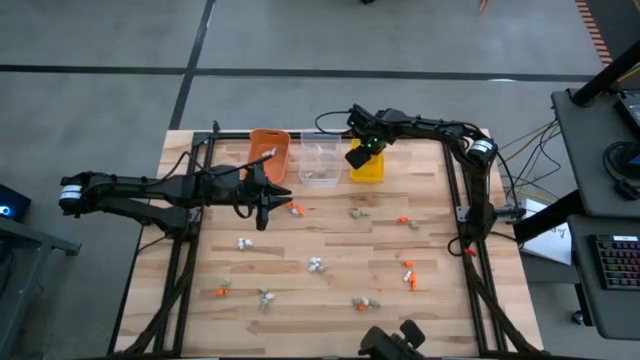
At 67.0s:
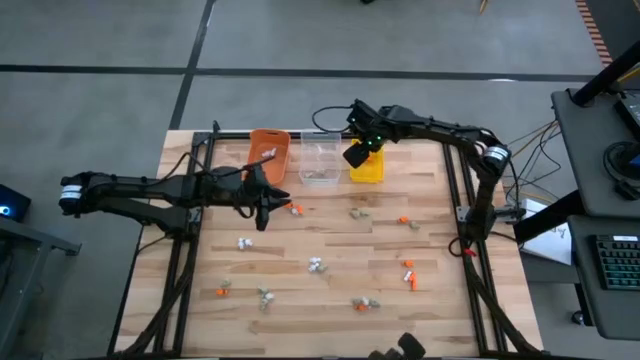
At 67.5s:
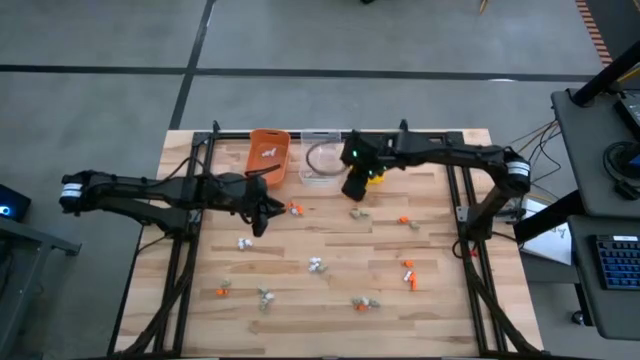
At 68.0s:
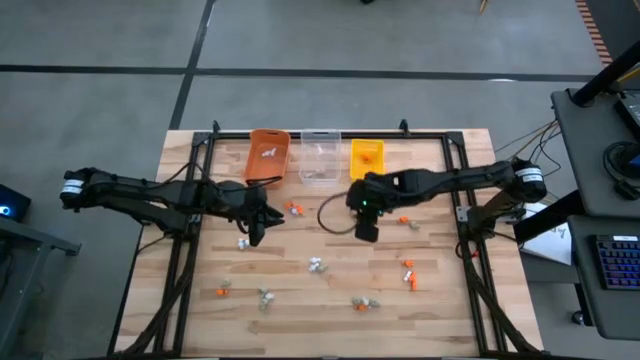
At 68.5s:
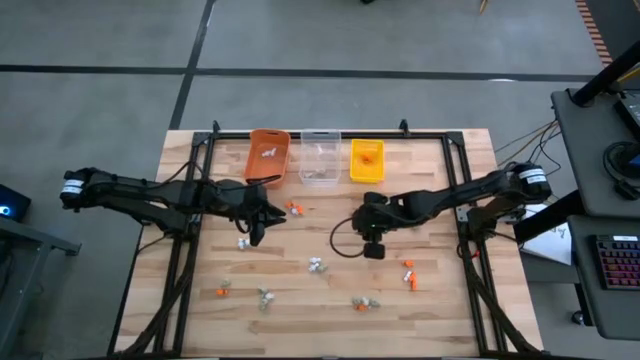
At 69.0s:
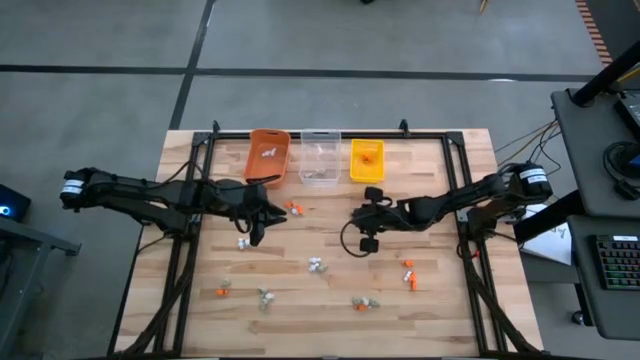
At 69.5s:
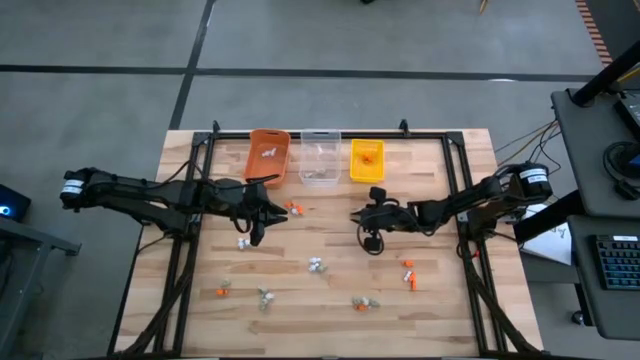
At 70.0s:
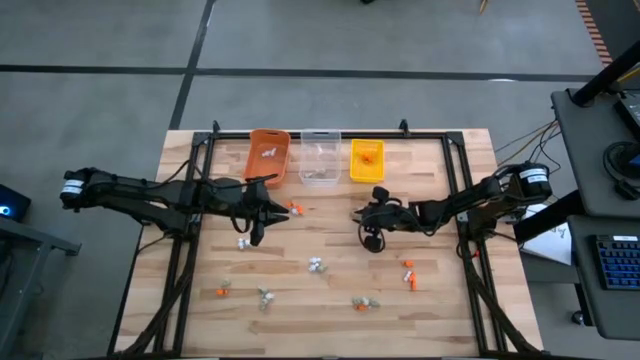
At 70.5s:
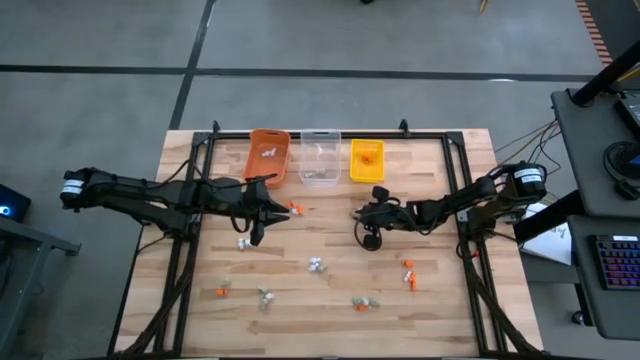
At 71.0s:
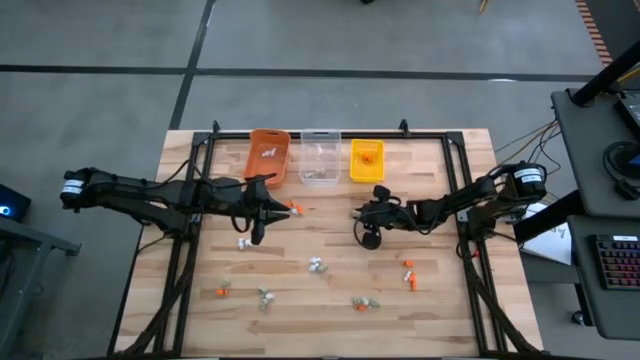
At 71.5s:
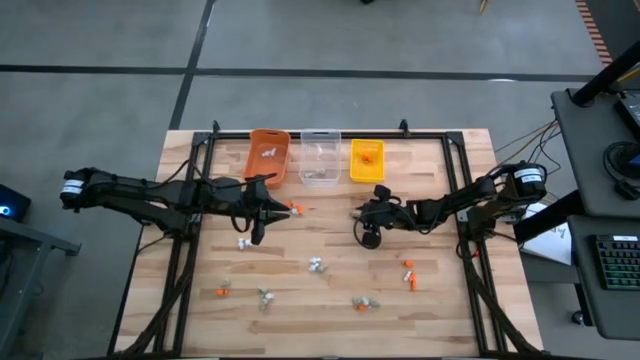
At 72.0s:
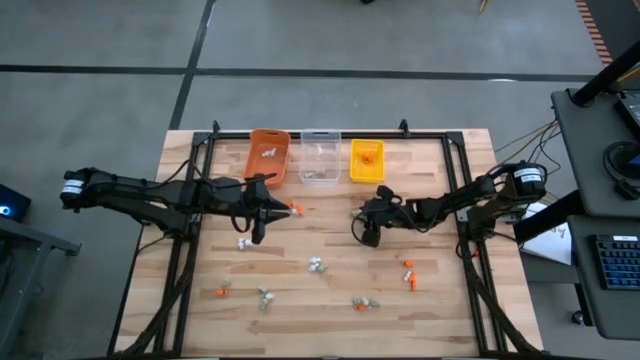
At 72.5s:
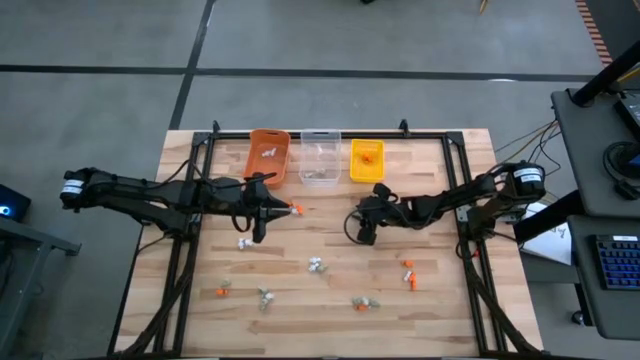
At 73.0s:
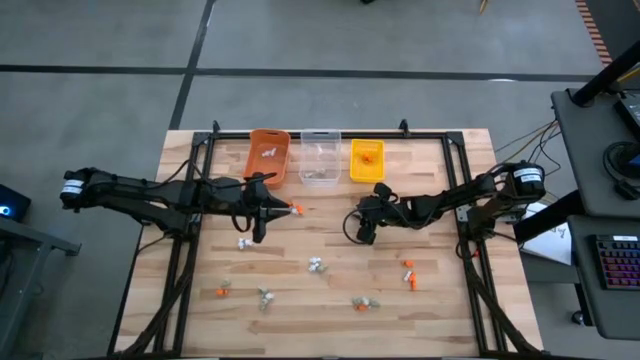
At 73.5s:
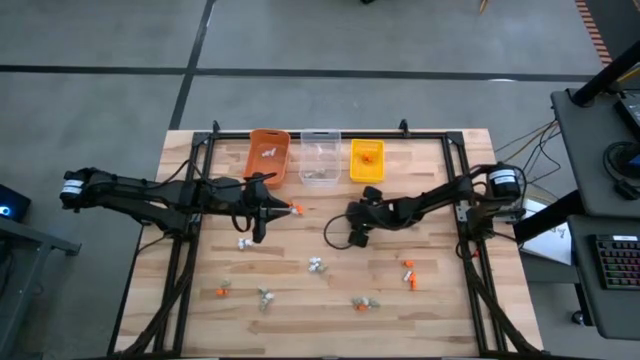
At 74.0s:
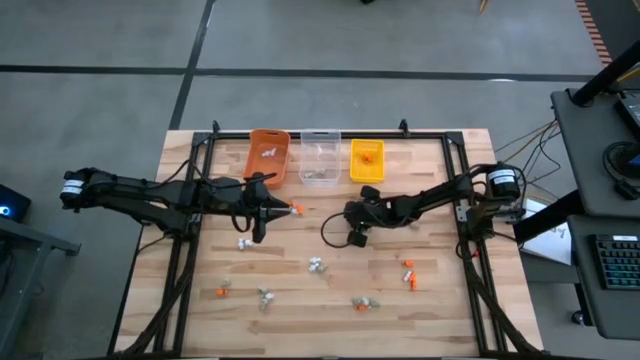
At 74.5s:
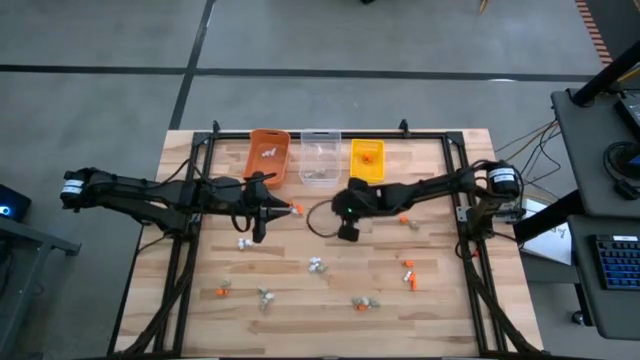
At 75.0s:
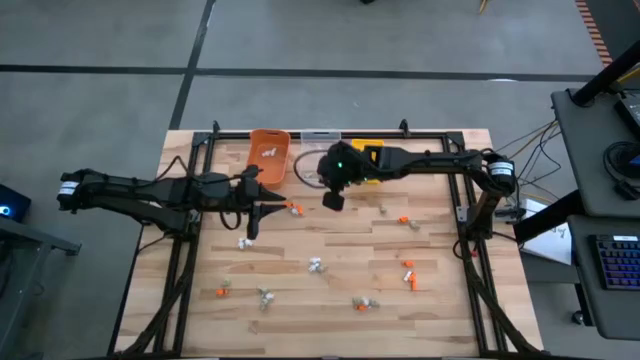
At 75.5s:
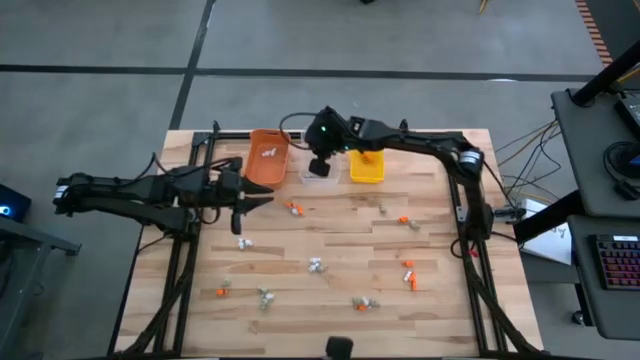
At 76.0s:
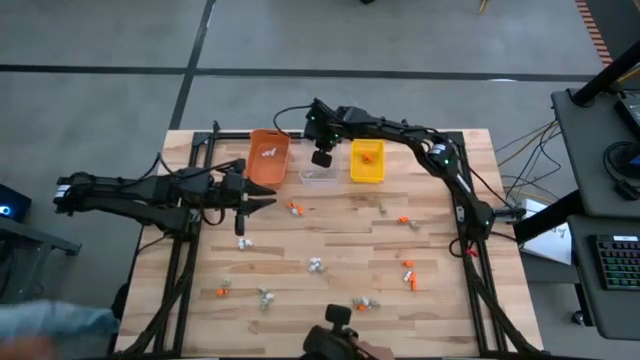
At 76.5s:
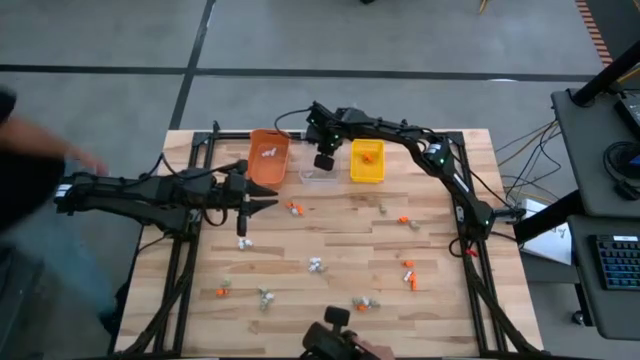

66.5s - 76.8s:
Task: Sort Halloween decoration
Put the gray skull toy into the transparent bin

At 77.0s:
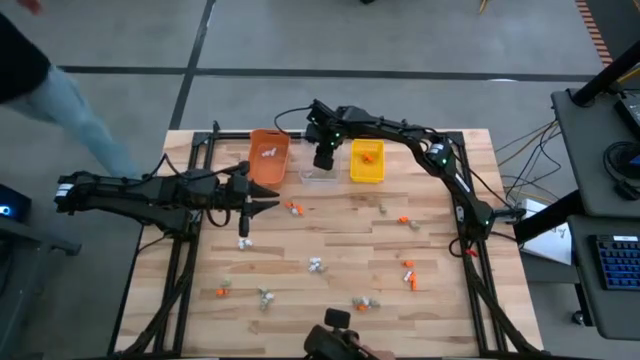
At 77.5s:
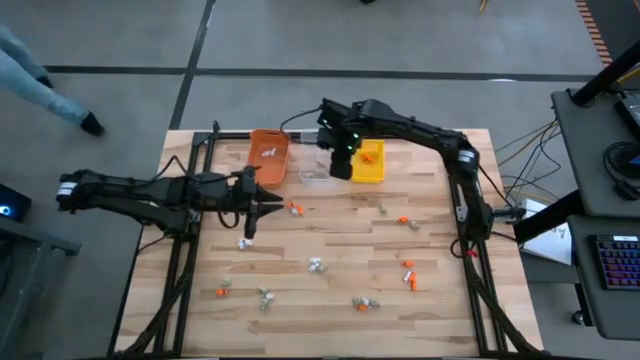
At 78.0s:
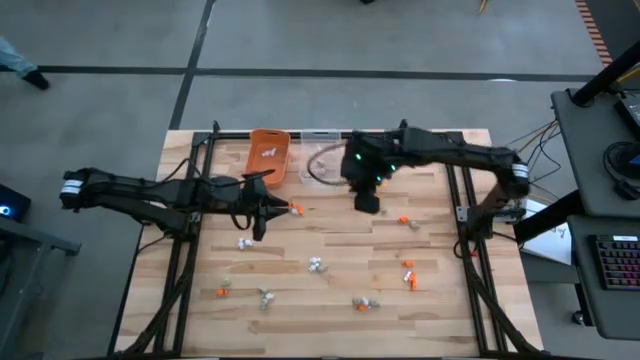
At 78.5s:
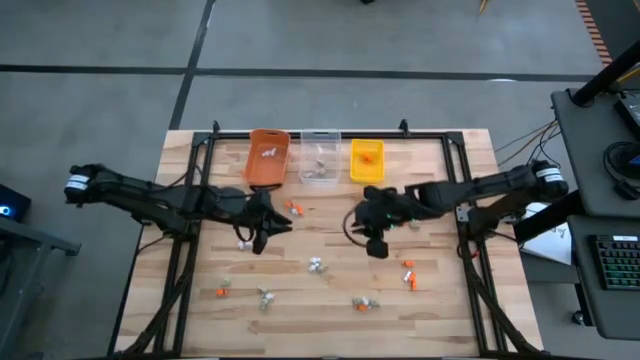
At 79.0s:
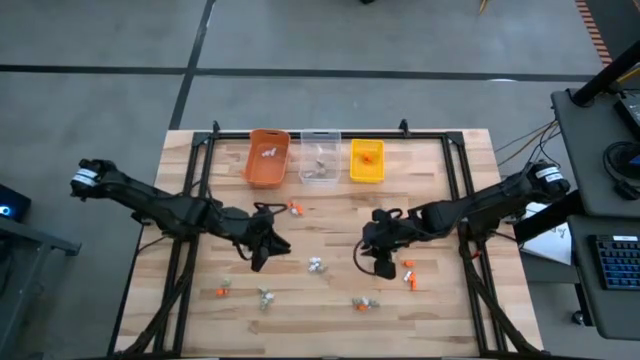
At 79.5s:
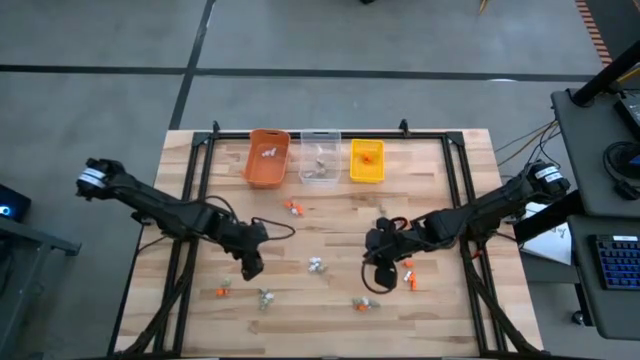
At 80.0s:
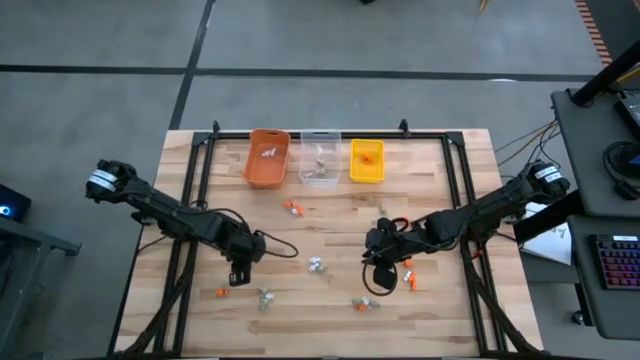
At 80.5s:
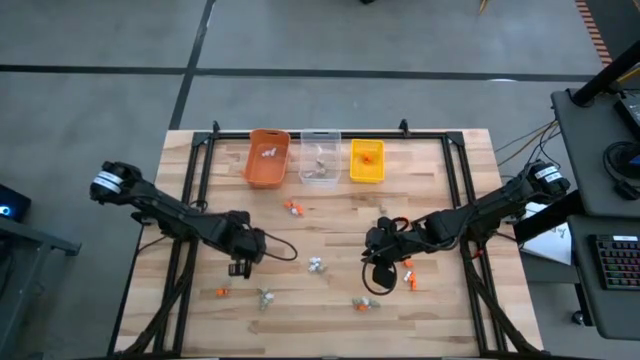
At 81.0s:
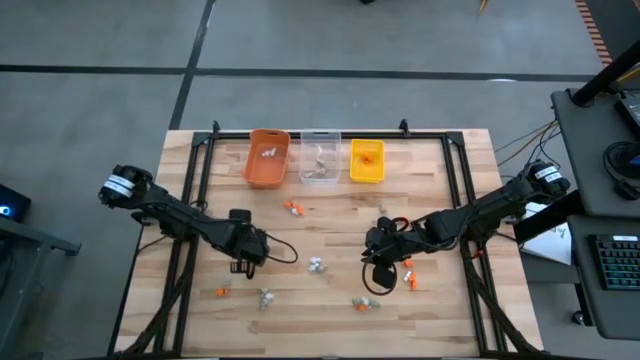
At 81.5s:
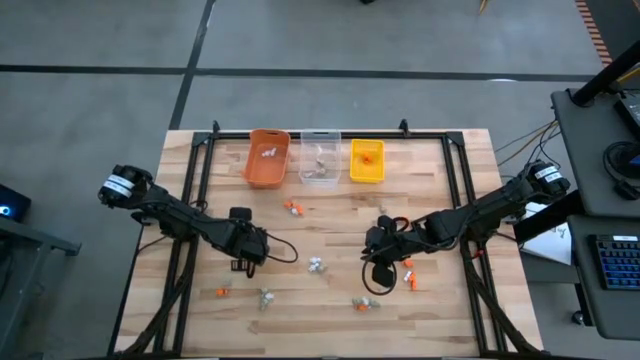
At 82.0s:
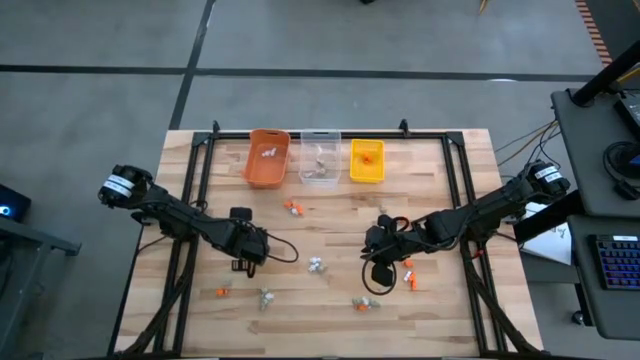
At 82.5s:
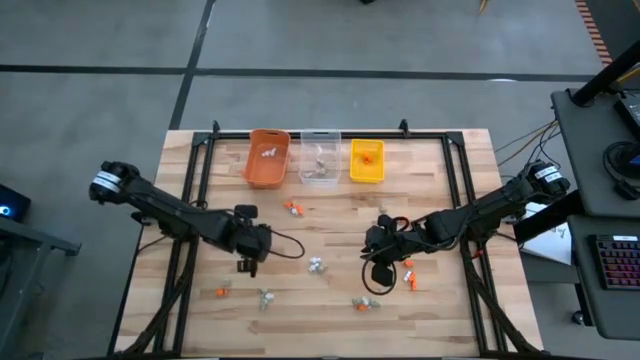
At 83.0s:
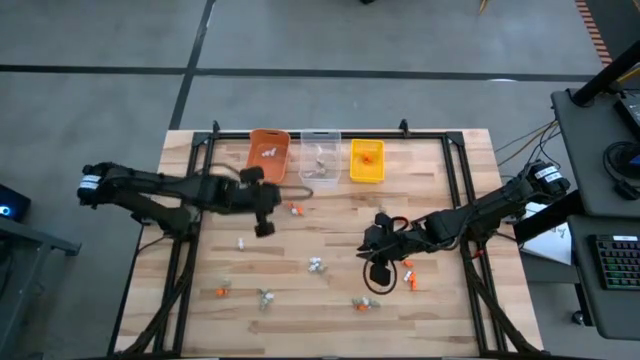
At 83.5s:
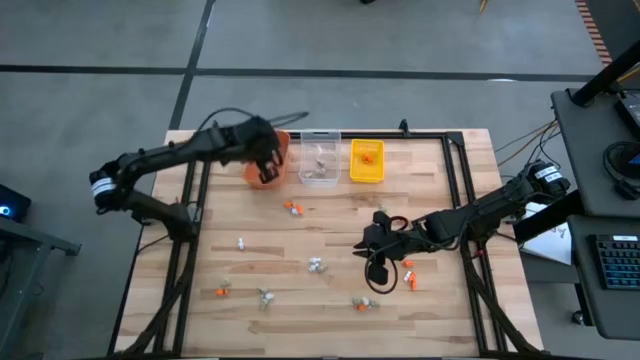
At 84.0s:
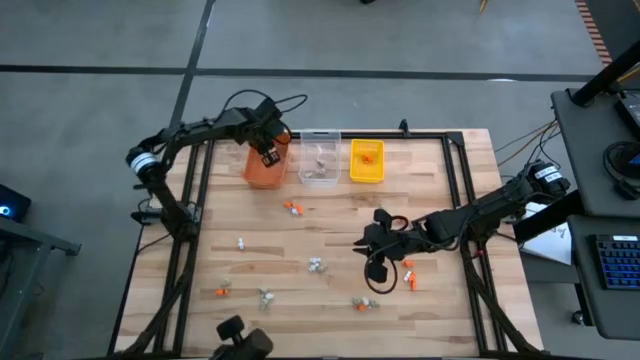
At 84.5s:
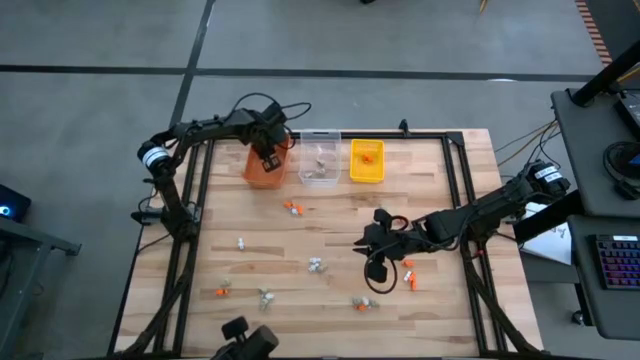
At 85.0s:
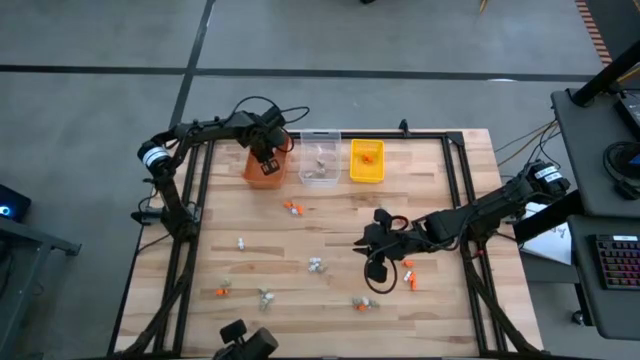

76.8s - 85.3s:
Put the white skeleton toy into the orange bin

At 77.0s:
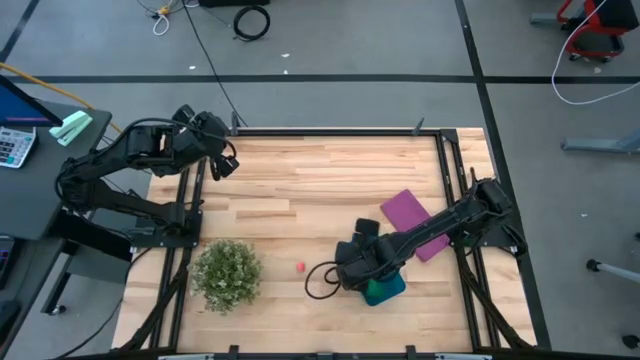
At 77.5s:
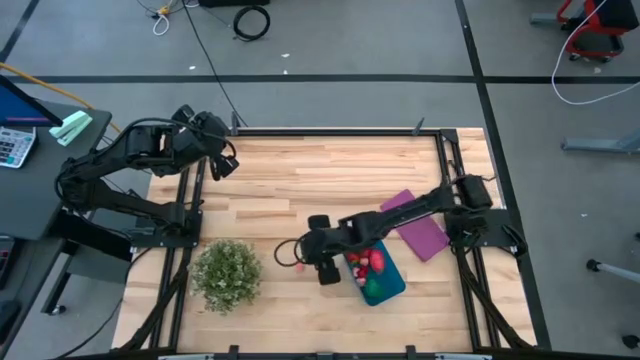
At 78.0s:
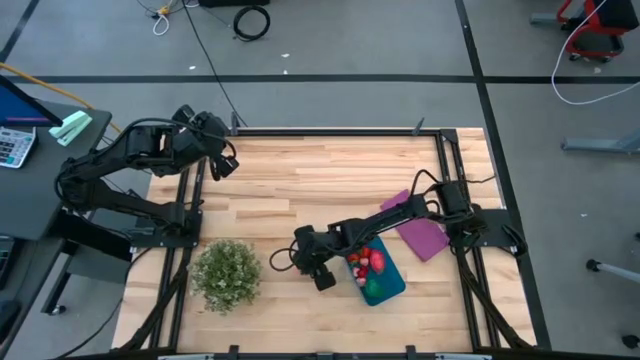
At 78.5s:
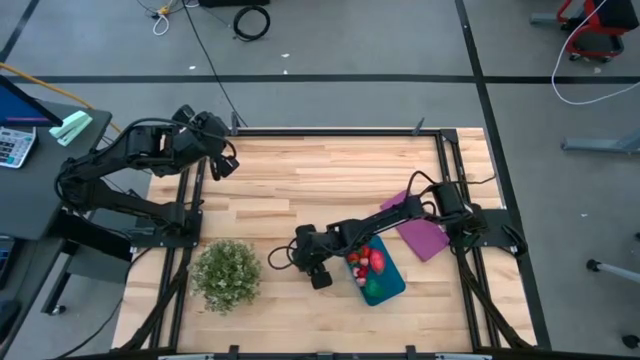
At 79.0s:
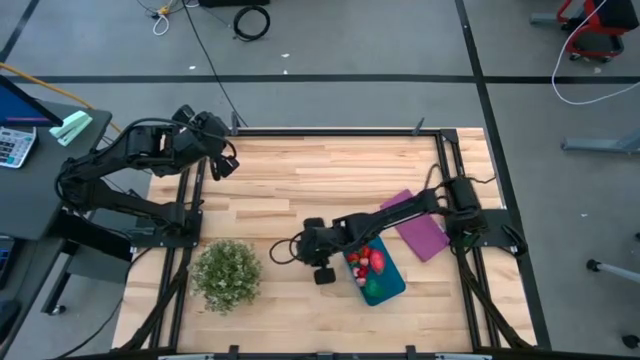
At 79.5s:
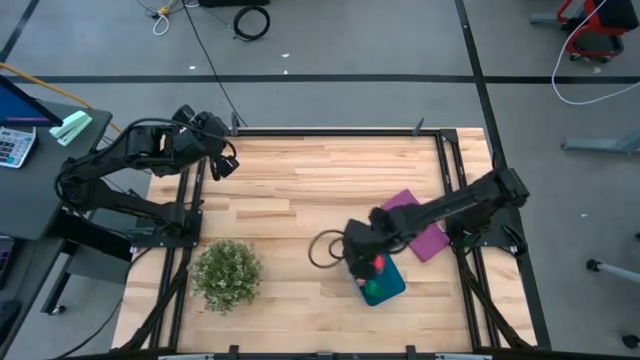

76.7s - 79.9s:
Task: Pick and placing Produce into tupperware
Put the pink peach into the blue bin
